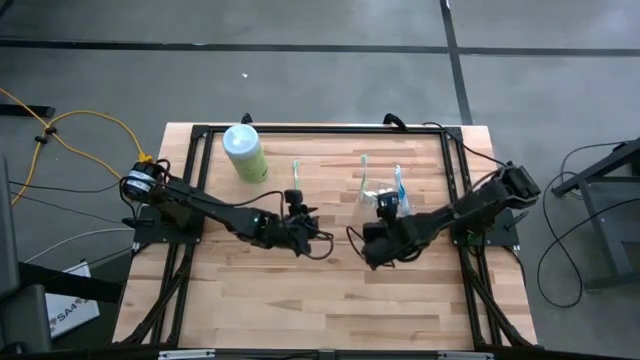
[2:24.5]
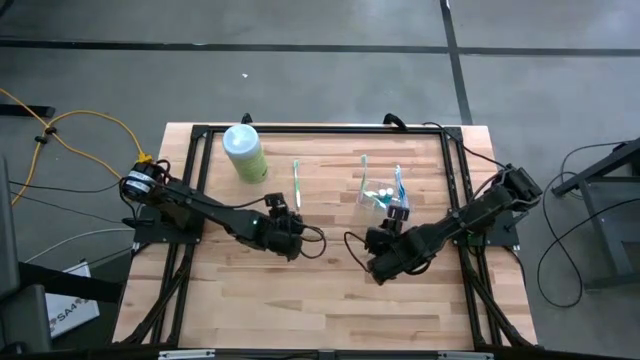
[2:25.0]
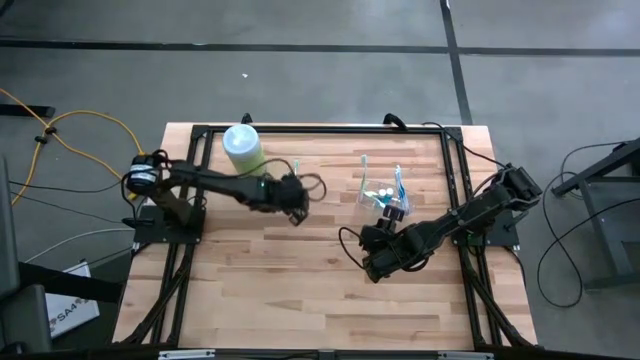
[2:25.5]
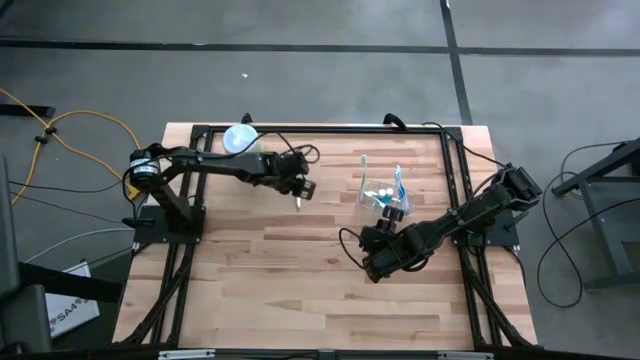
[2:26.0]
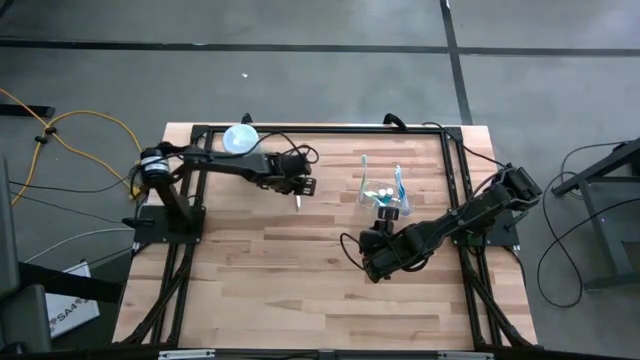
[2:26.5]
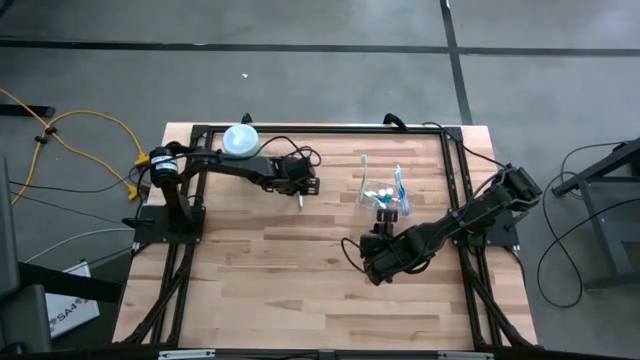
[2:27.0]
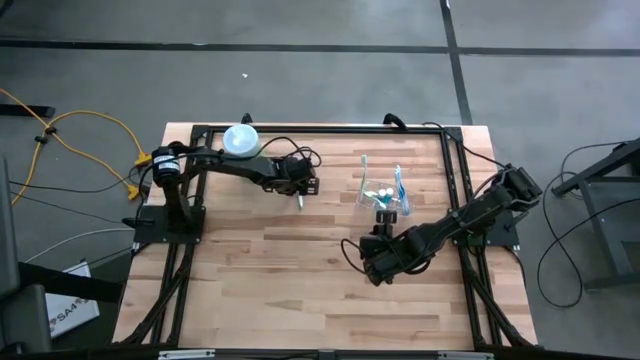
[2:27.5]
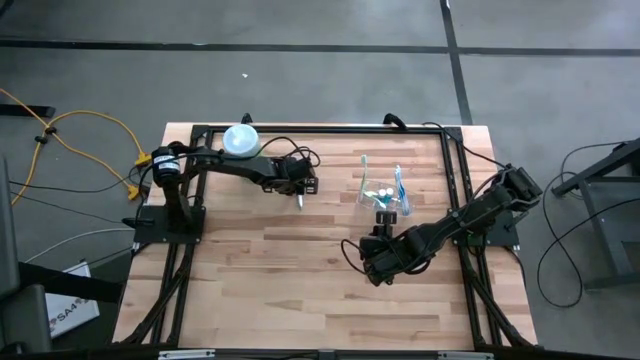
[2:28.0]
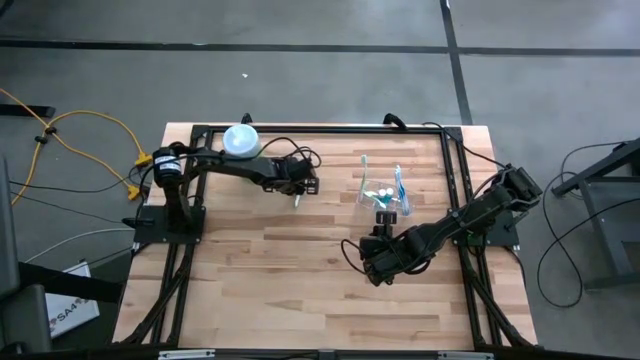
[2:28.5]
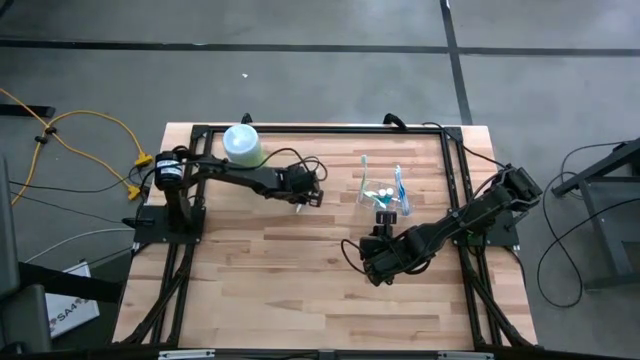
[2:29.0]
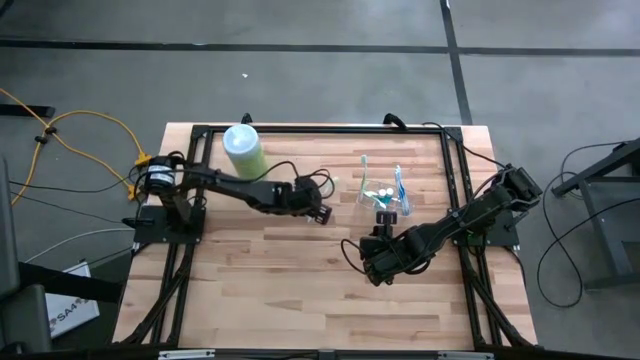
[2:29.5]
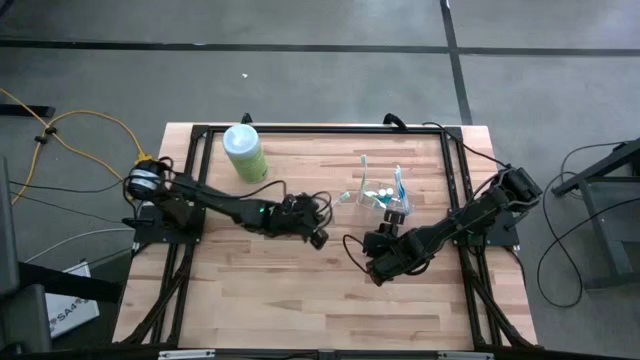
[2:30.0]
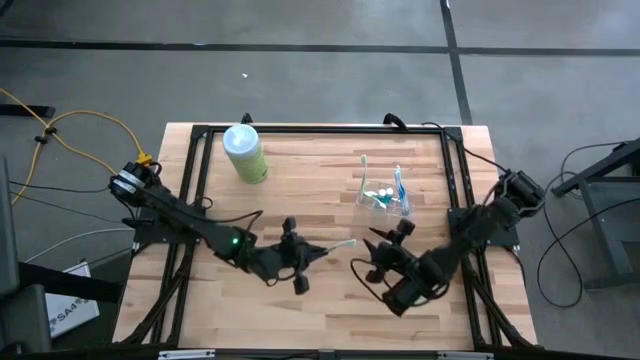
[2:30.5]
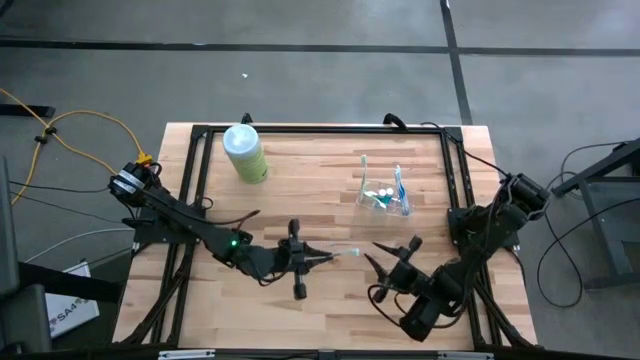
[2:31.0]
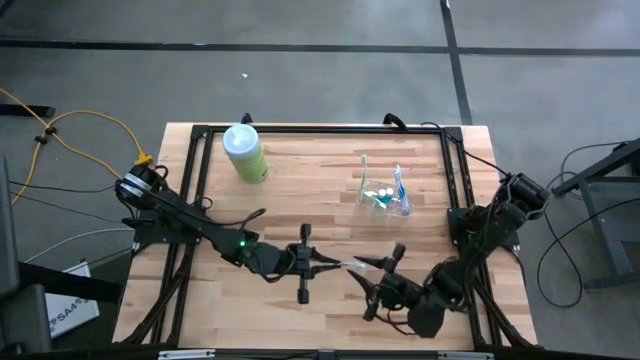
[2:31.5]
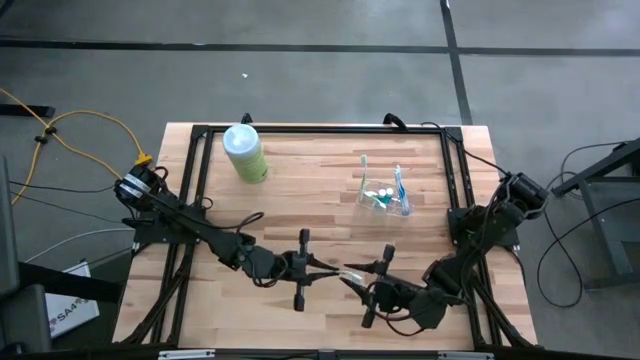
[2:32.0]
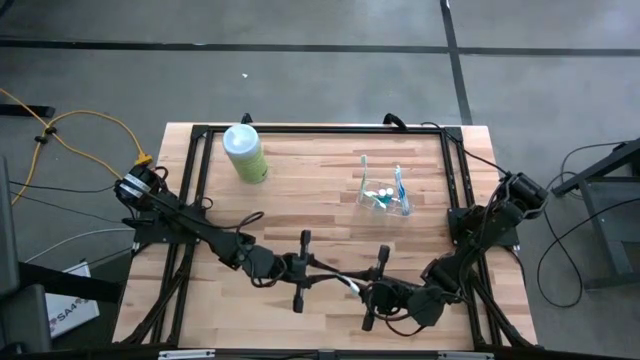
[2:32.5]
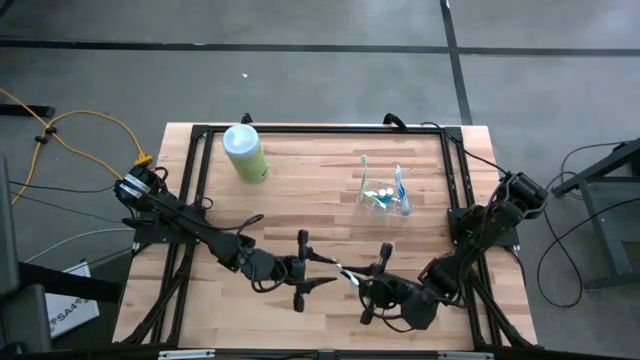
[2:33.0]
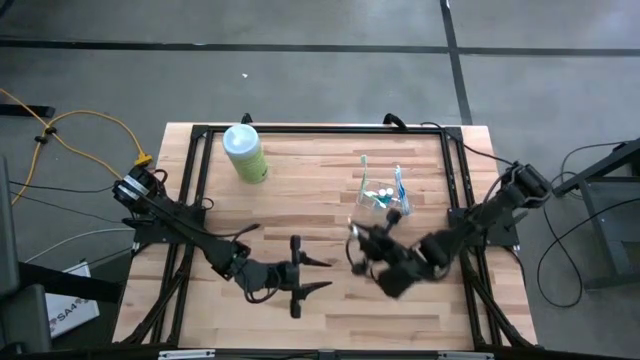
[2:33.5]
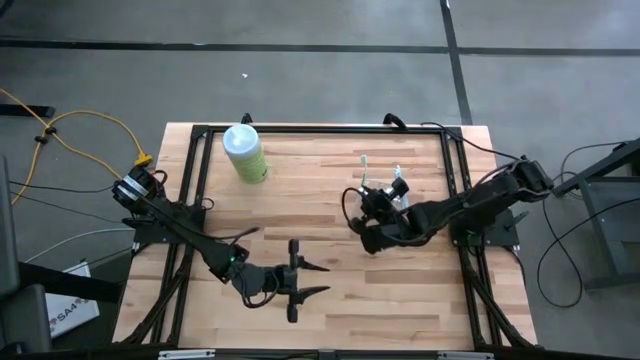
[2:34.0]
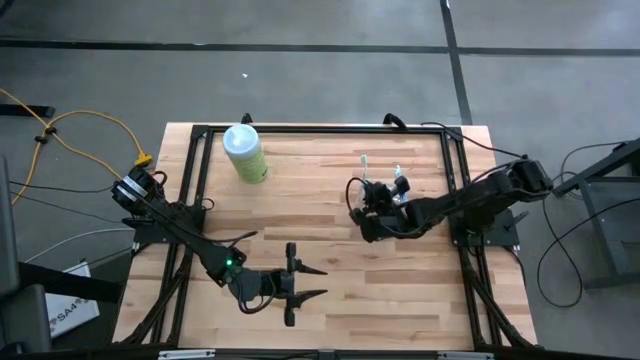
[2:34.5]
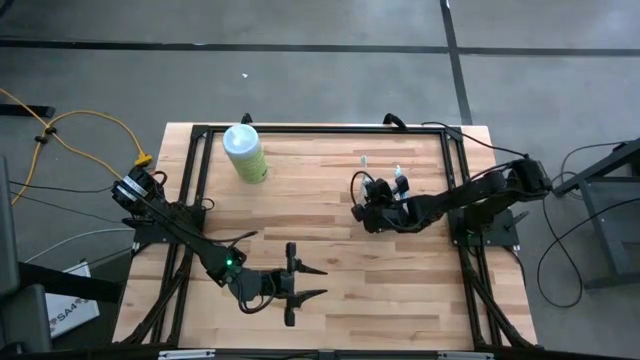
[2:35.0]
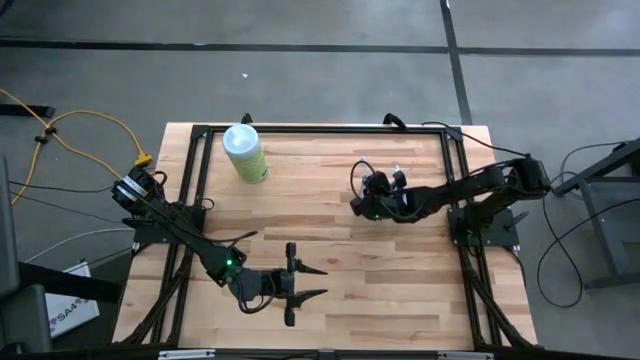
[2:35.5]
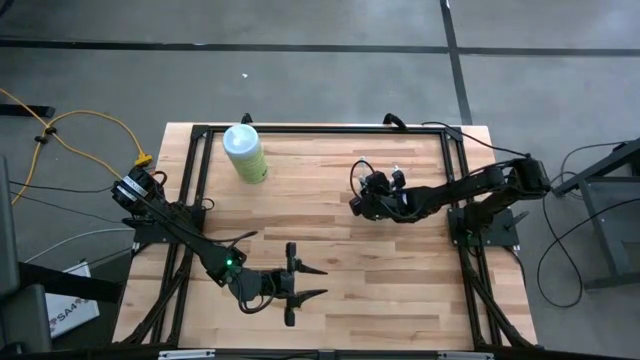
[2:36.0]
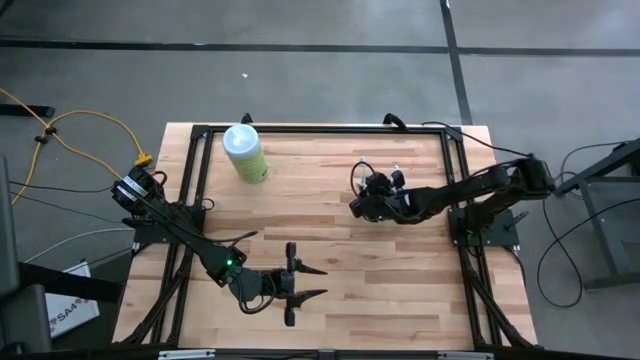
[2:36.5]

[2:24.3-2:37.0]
Task: Pick & Place toothbrushing station
Put the green toothbrush into the left of the transparent organizer

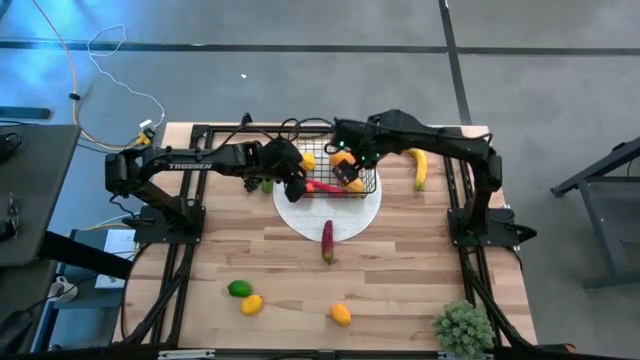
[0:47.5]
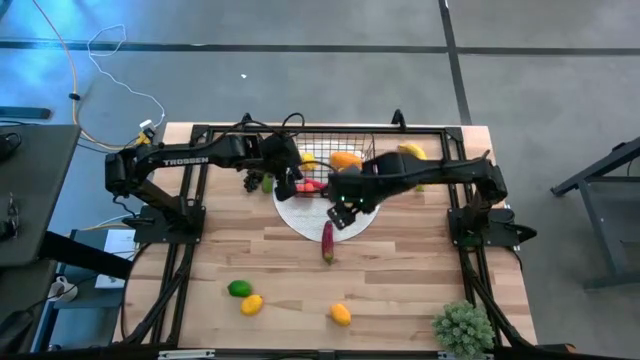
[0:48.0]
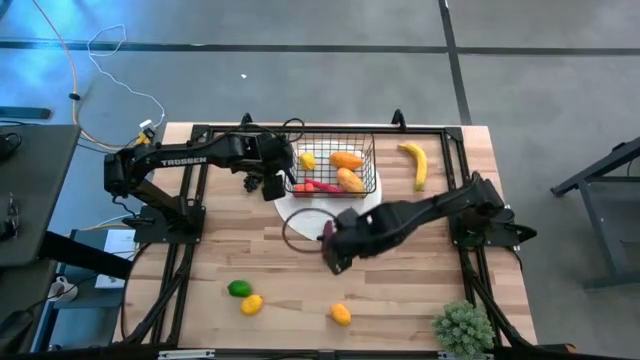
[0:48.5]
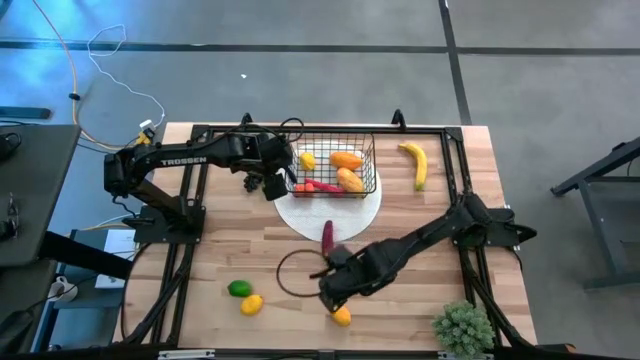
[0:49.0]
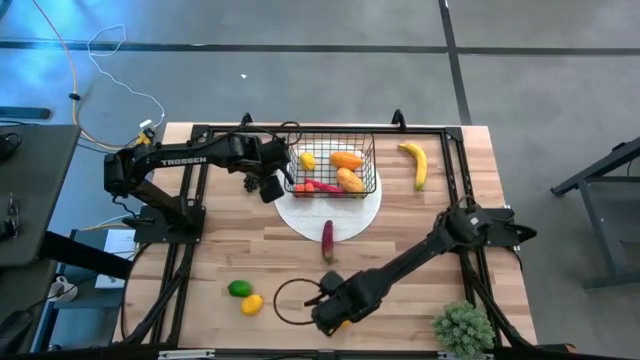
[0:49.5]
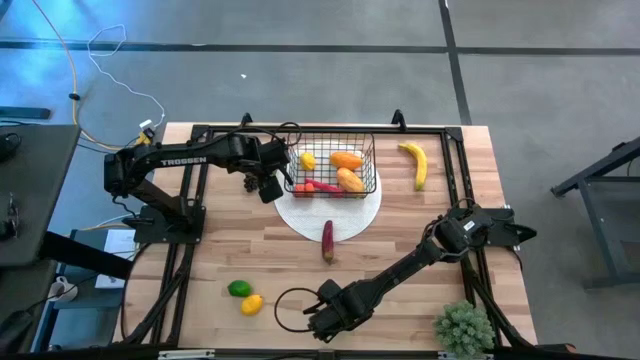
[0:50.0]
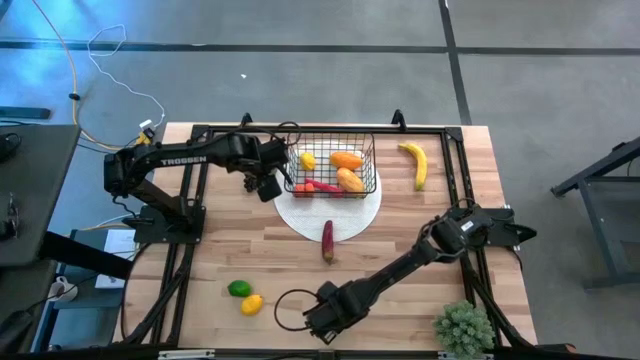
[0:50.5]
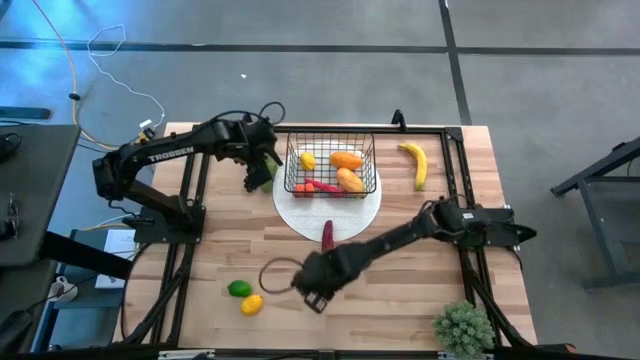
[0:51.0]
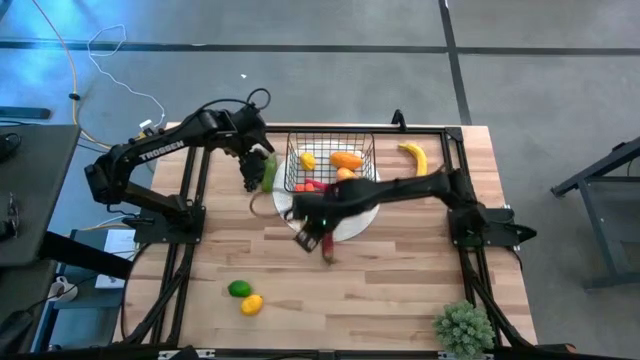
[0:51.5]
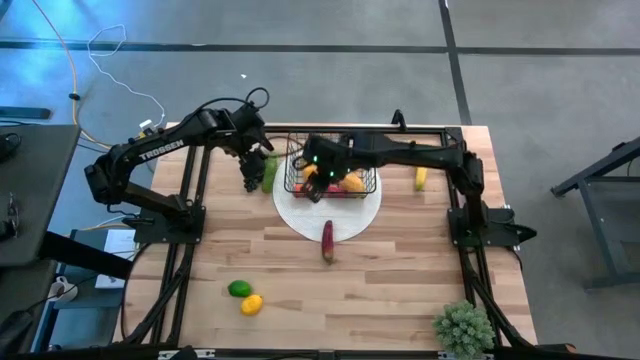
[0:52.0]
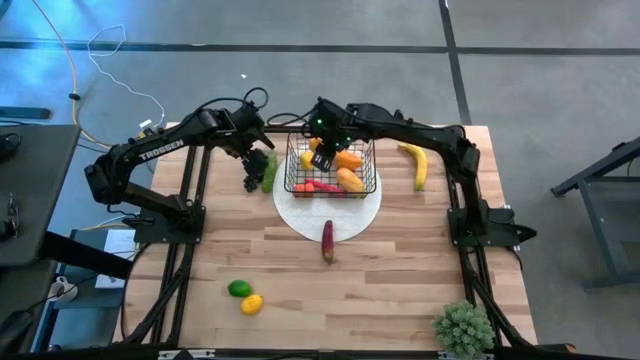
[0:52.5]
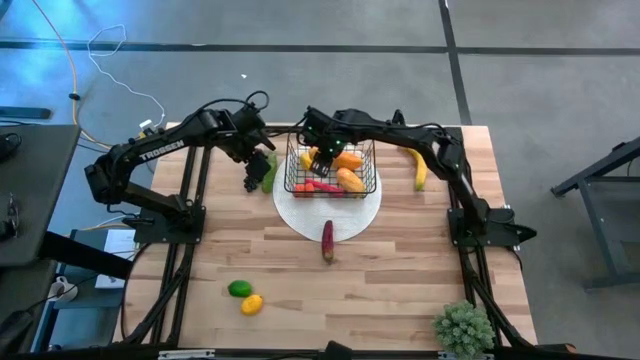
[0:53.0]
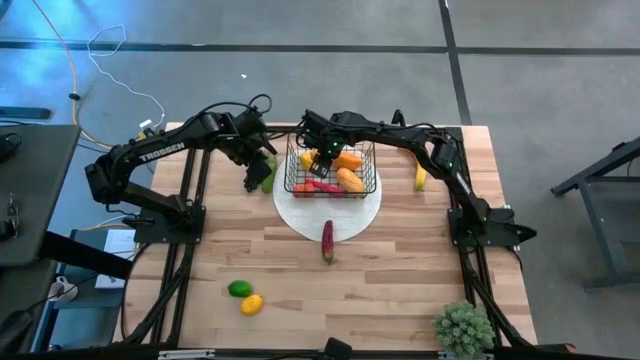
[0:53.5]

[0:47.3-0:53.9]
Task: Build produce basket
Put the right lemon into the wire basket
